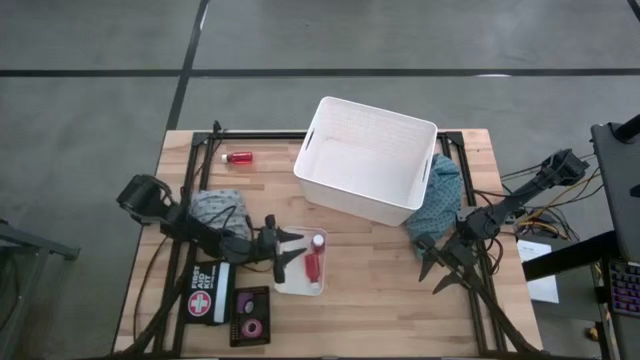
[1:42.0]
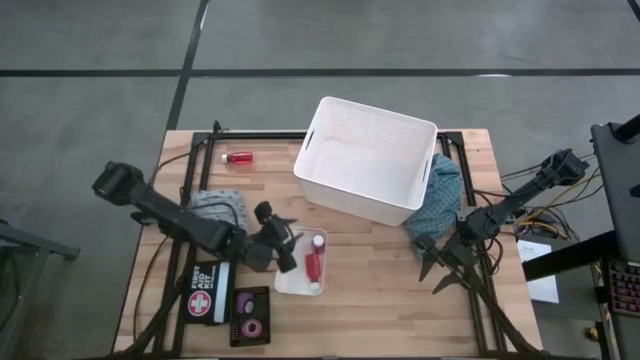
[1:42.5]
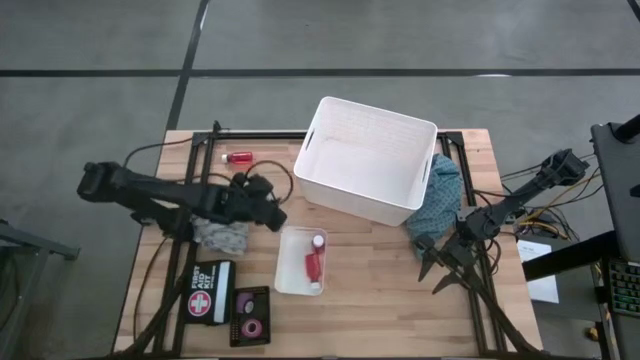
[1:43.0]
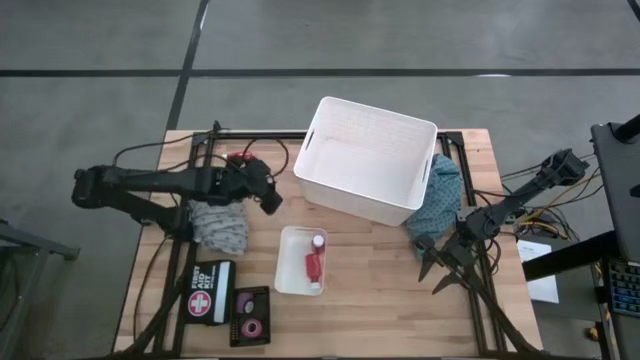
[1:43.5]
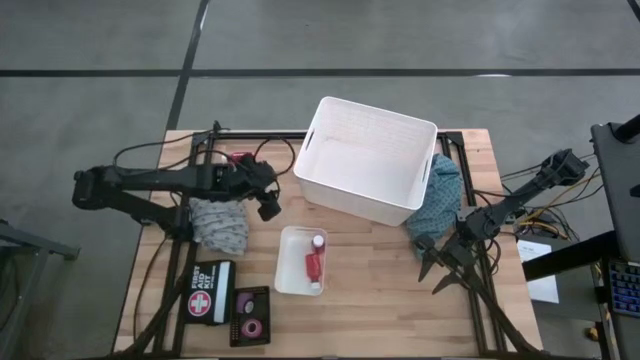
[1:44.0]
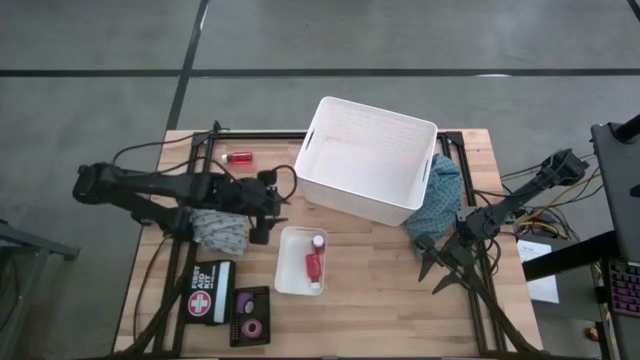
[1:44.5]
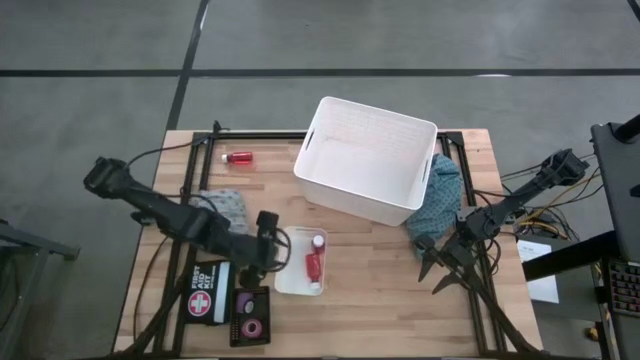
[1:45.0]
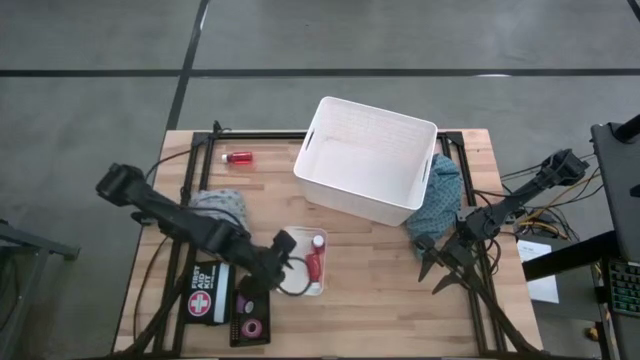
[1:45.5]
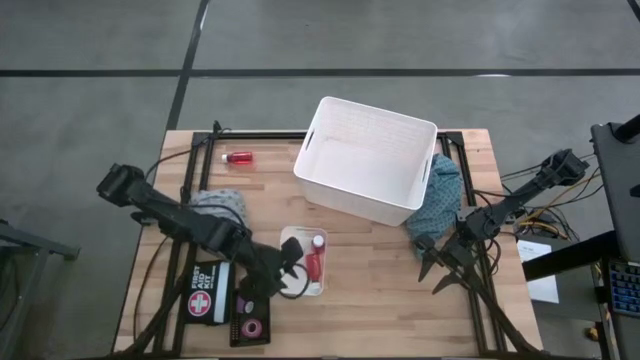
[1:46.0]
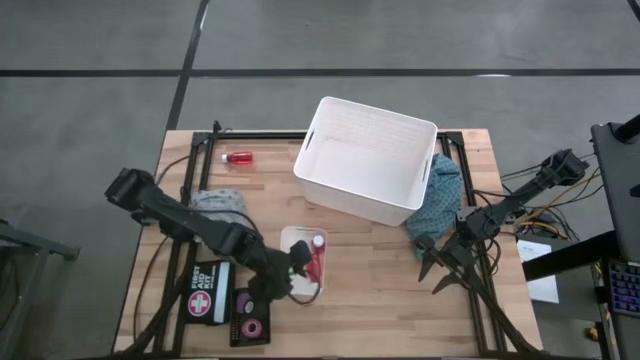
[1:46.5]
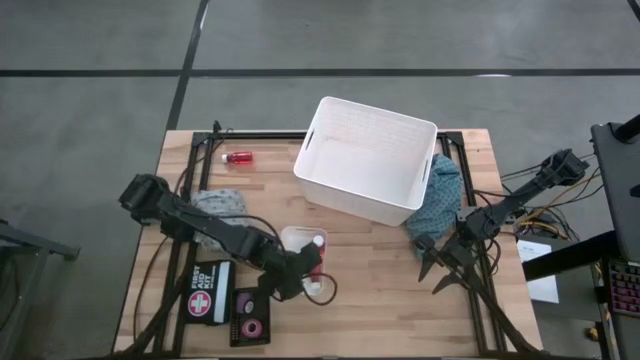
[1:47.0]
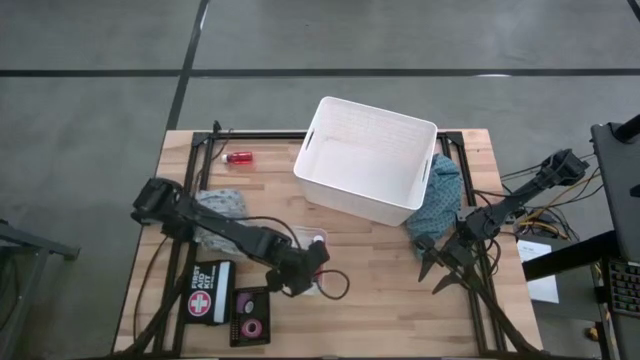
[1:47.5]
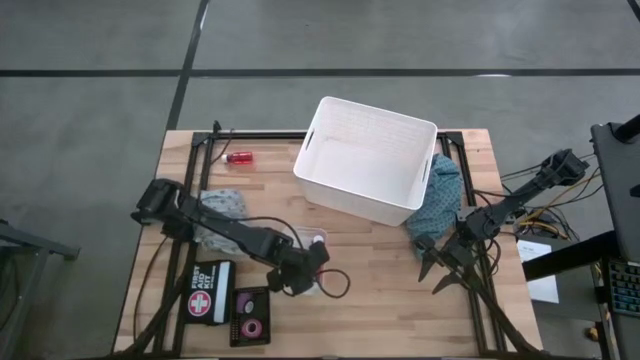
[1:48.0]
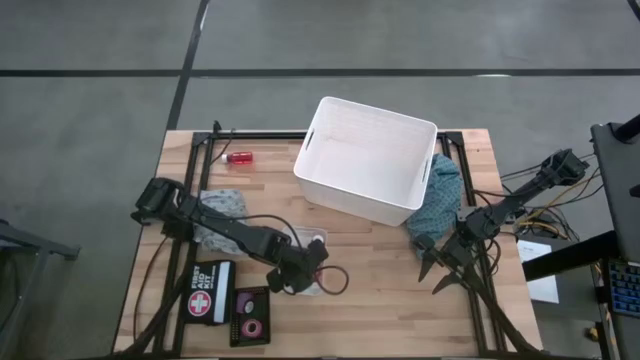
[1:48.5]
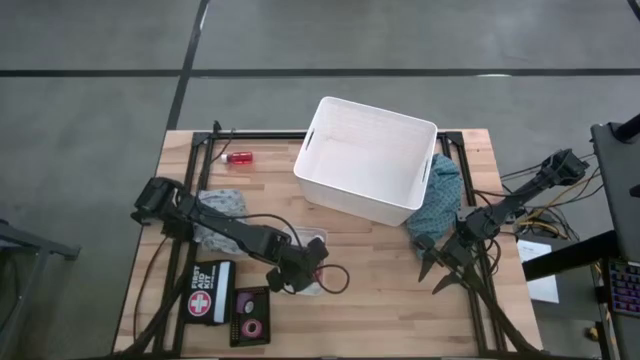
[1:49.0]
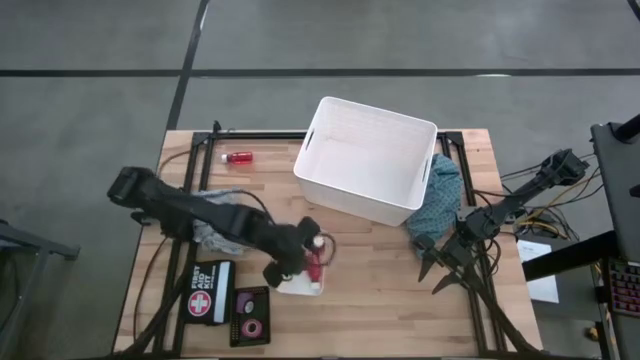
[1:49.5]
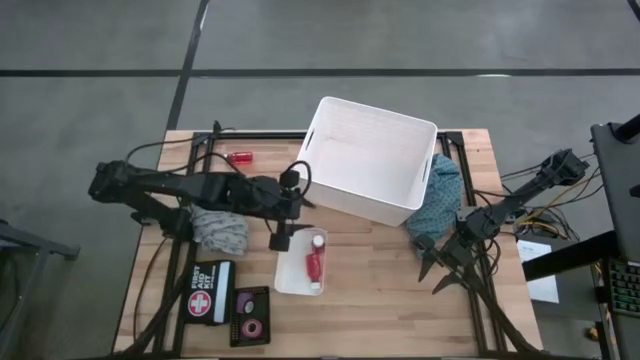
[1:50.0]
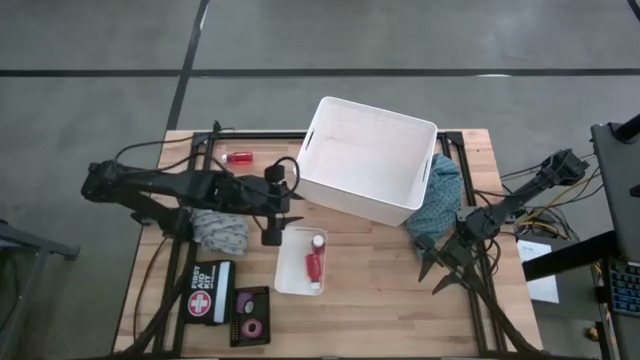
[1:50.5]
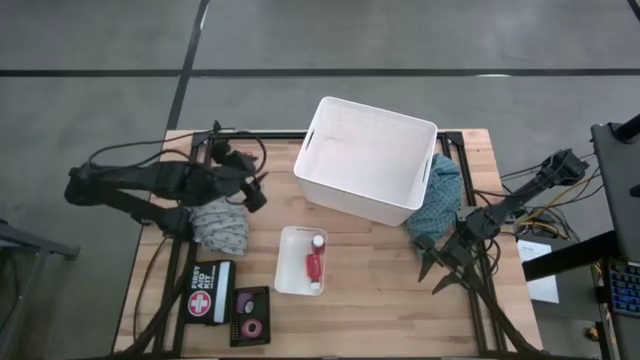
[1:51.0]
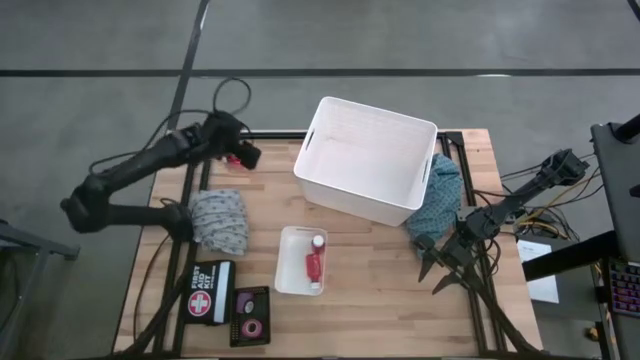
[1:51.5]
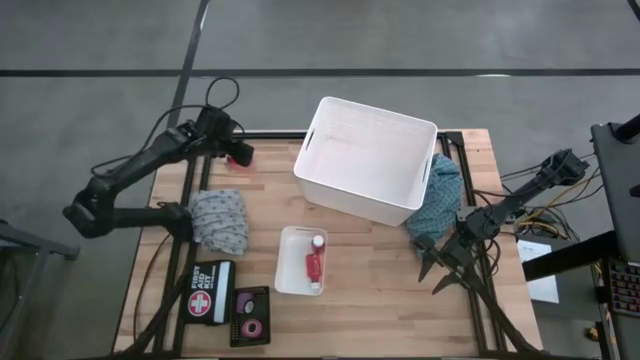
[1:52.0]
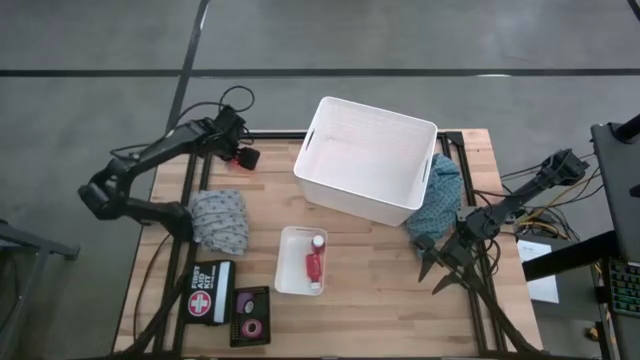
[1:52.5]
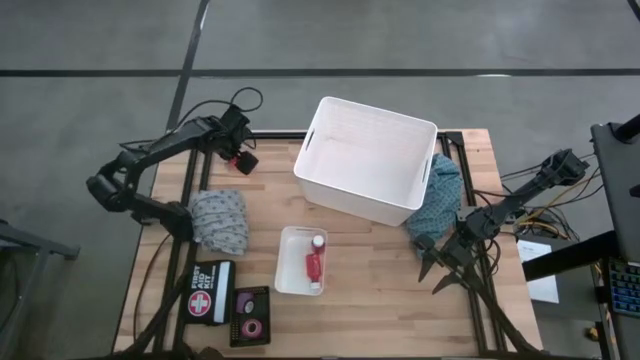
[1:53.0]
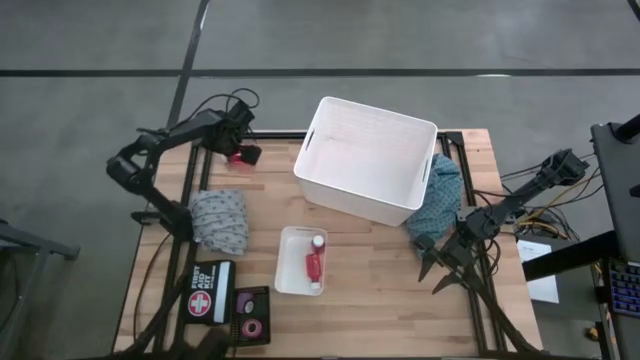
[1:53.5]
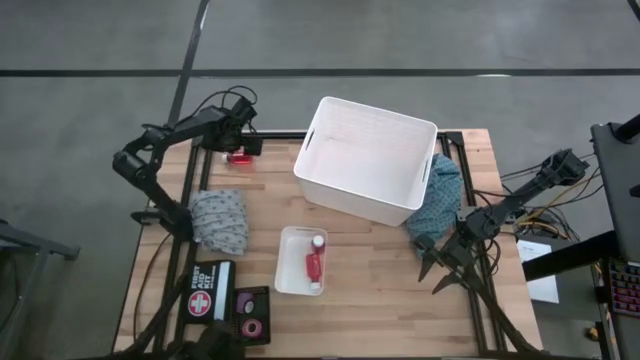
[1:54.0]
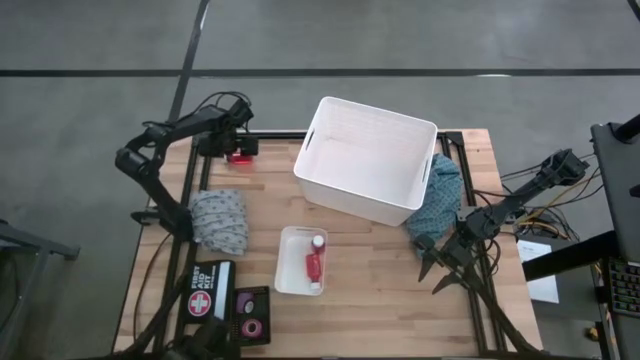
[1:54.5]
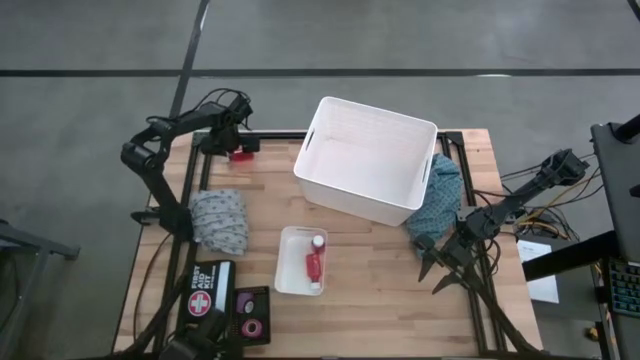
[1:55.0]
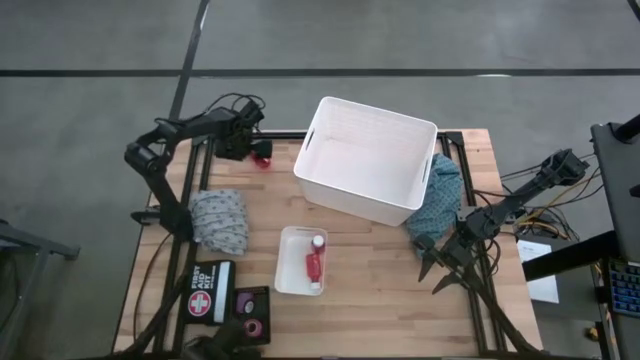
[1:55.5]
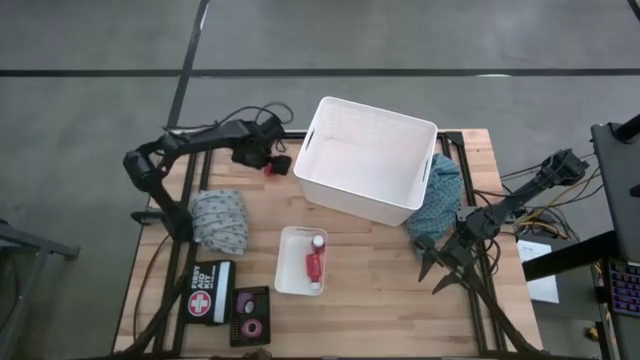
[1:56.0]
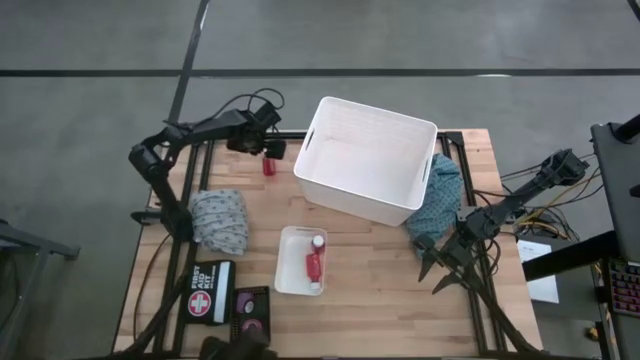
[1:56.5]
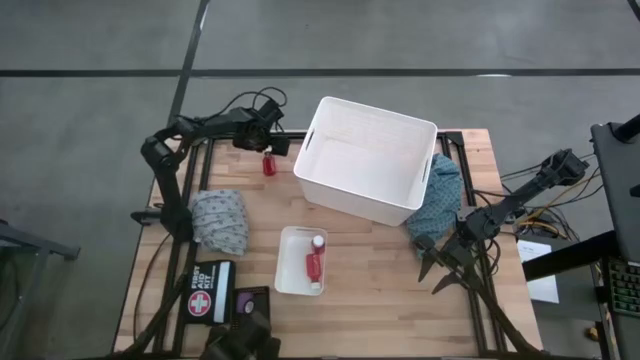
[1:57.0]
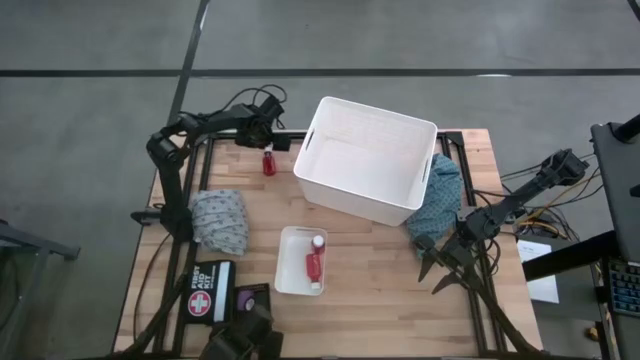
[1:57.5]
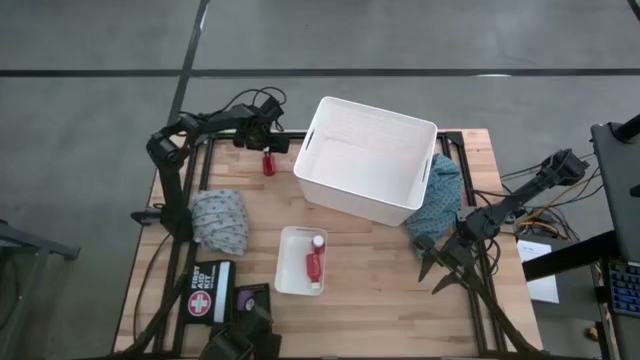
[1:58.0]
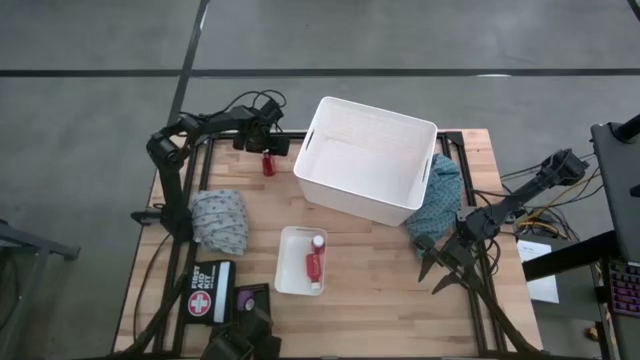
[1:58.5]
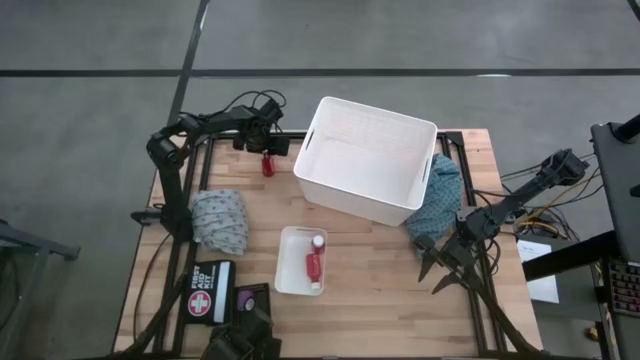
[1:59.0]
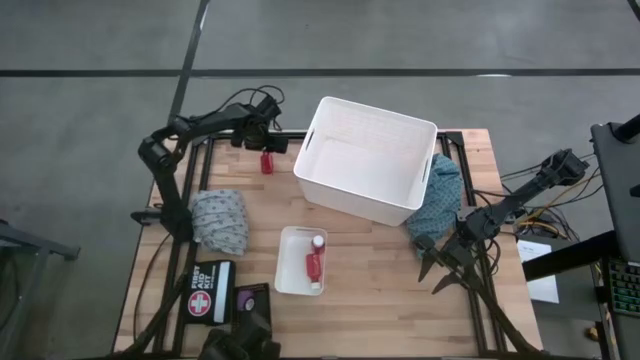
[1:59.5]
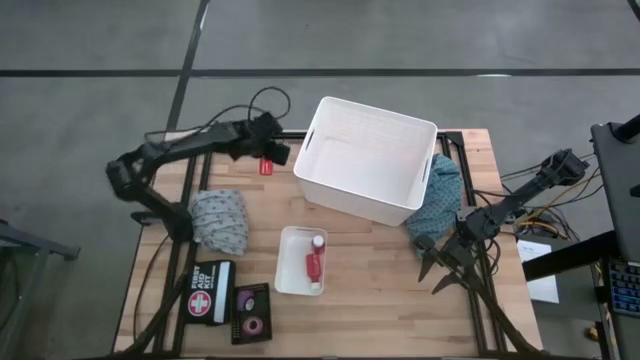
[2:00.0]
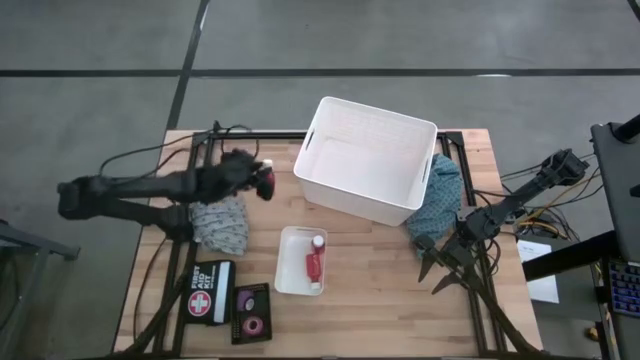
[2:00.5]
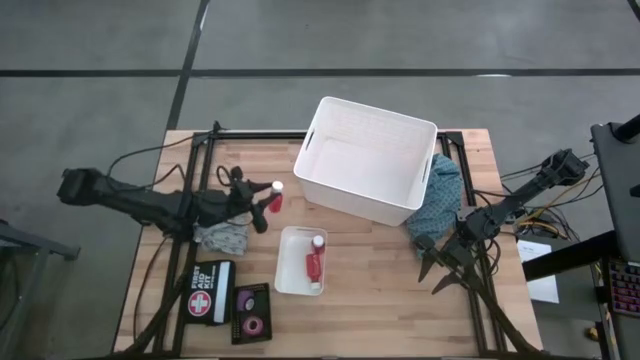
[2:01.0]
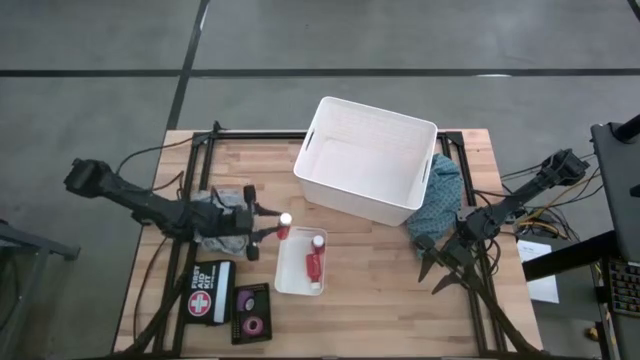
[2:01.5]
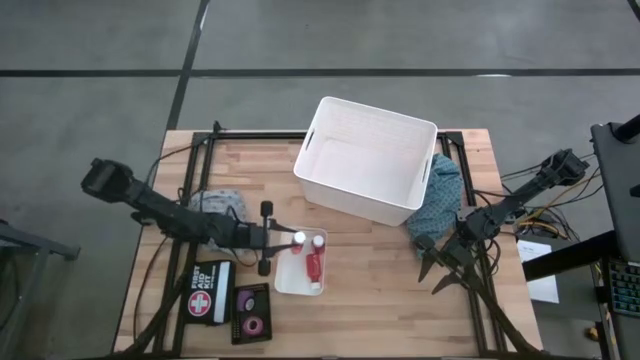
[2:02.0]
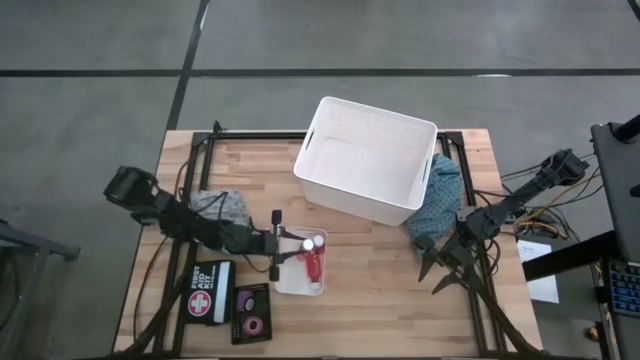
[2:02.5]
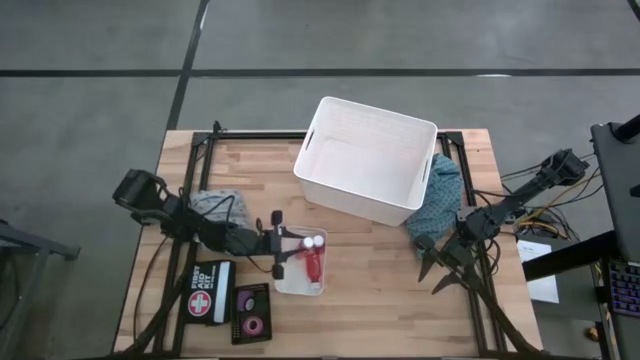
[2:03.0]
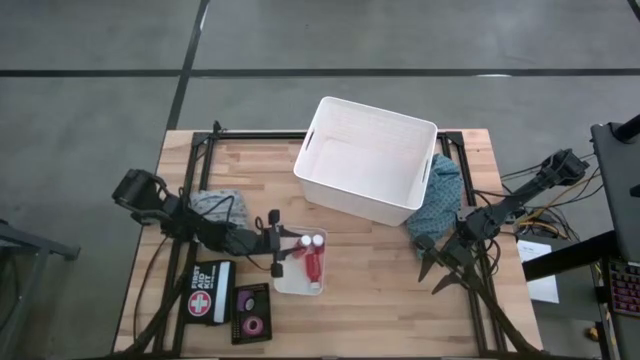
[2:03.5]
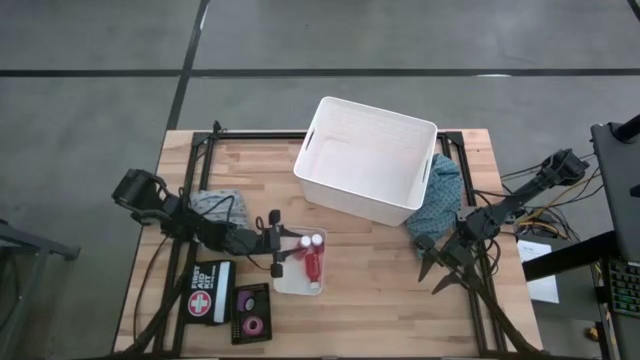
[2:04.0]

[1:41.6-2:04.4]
Task: Pick & Place Medicine items
Put the red medicine bottle into the small white bin
